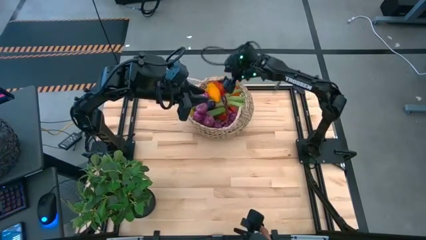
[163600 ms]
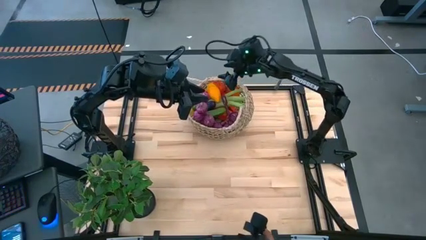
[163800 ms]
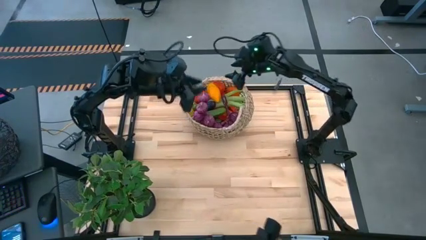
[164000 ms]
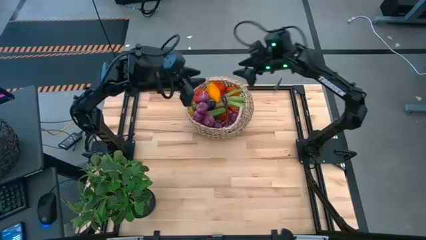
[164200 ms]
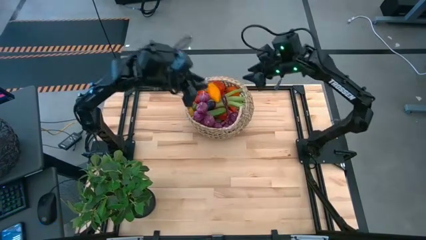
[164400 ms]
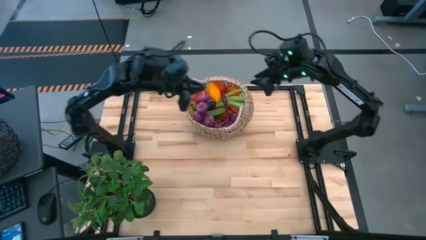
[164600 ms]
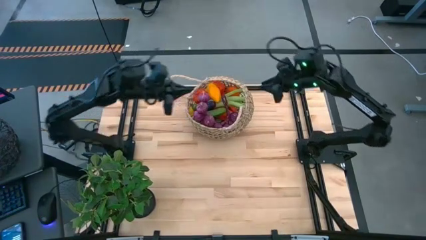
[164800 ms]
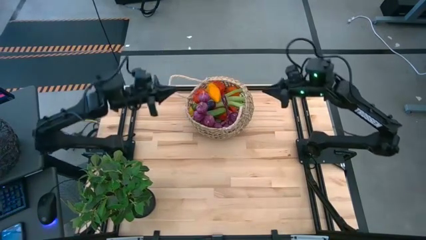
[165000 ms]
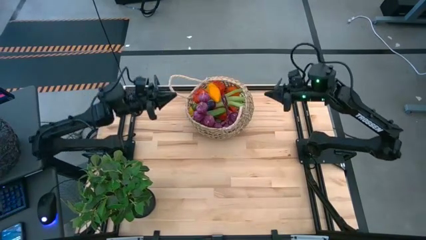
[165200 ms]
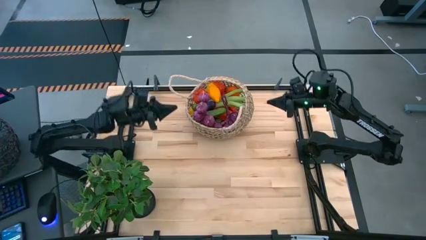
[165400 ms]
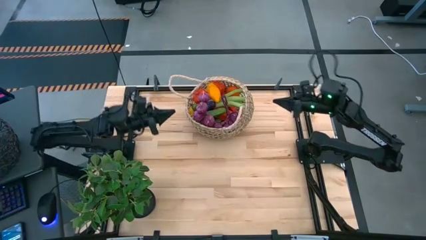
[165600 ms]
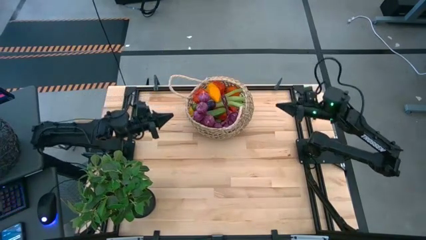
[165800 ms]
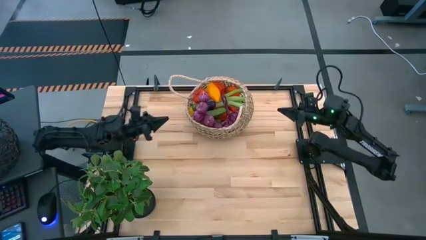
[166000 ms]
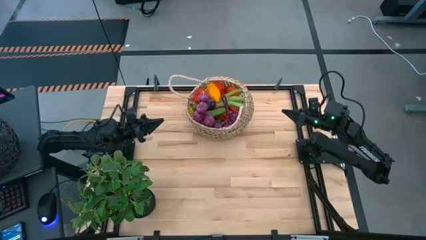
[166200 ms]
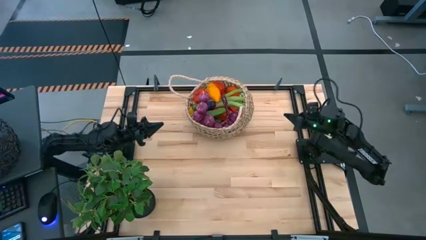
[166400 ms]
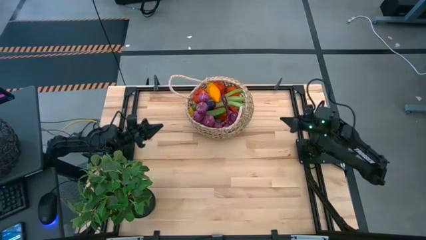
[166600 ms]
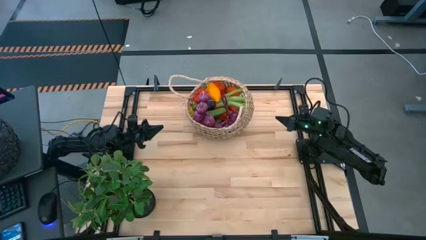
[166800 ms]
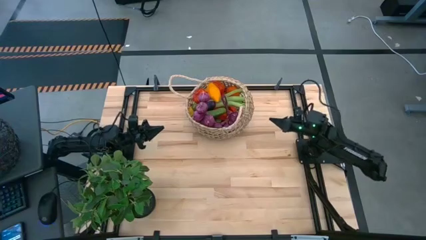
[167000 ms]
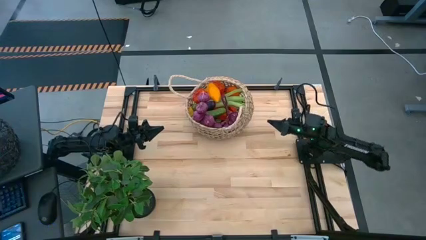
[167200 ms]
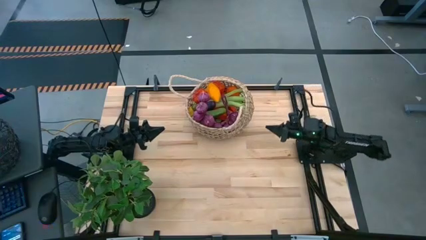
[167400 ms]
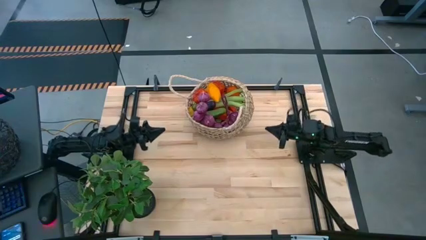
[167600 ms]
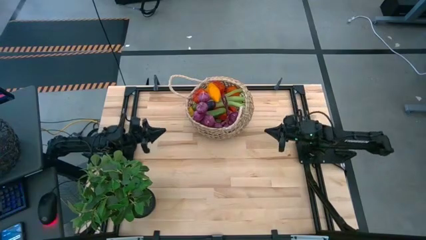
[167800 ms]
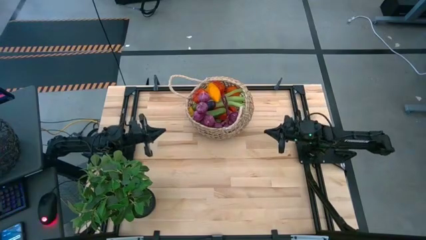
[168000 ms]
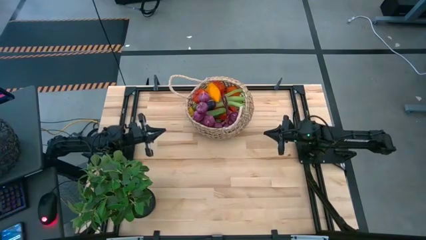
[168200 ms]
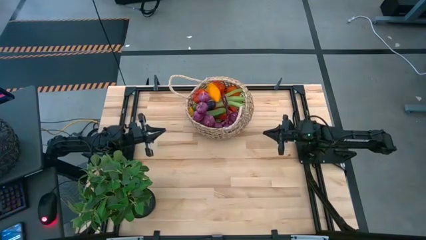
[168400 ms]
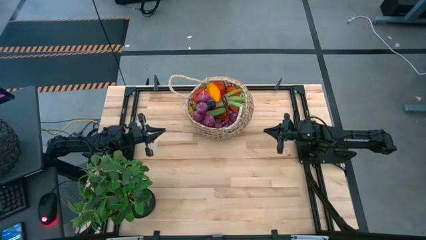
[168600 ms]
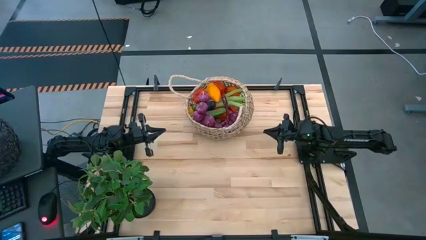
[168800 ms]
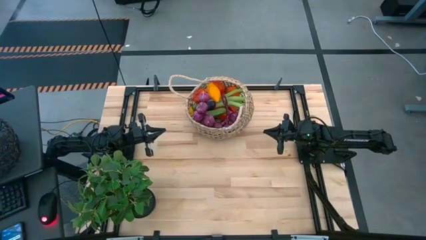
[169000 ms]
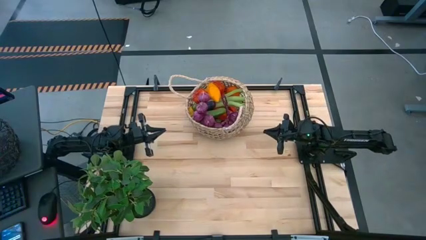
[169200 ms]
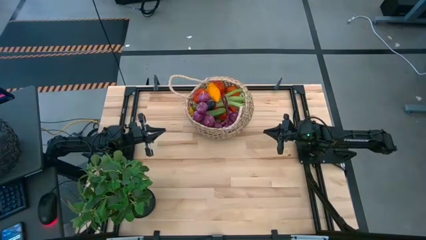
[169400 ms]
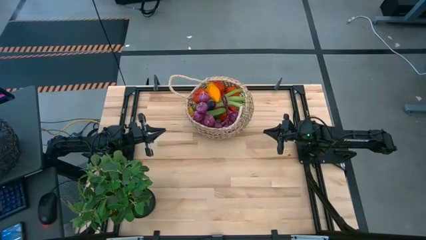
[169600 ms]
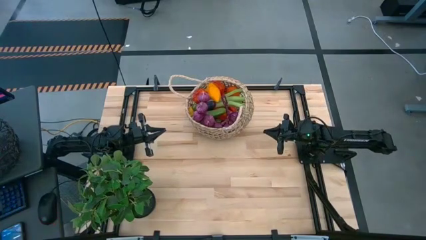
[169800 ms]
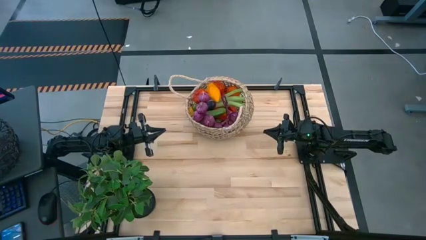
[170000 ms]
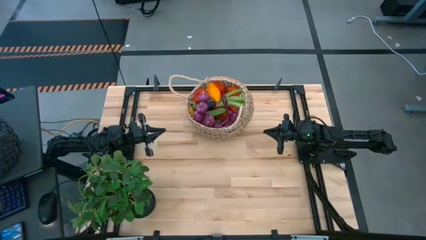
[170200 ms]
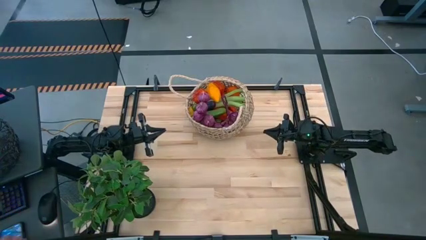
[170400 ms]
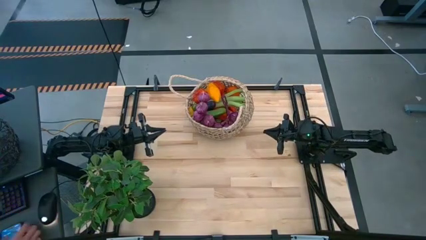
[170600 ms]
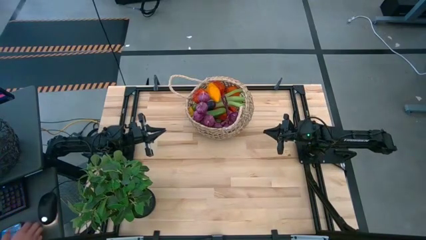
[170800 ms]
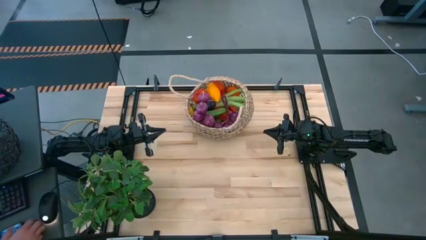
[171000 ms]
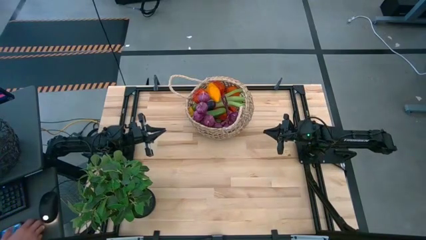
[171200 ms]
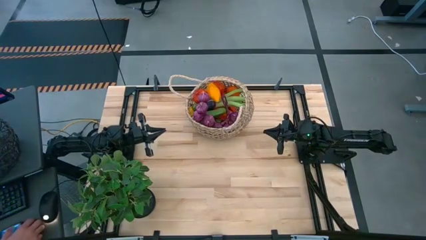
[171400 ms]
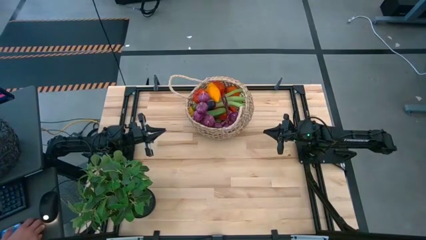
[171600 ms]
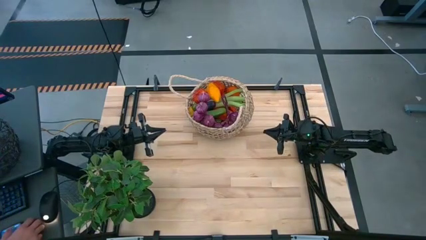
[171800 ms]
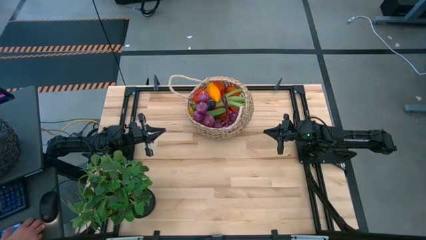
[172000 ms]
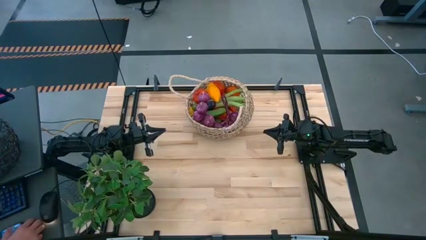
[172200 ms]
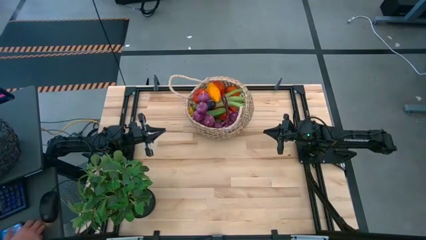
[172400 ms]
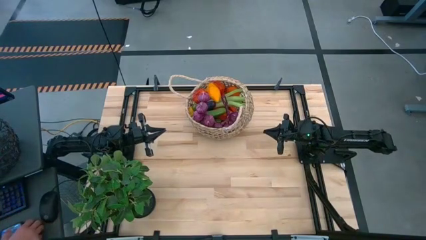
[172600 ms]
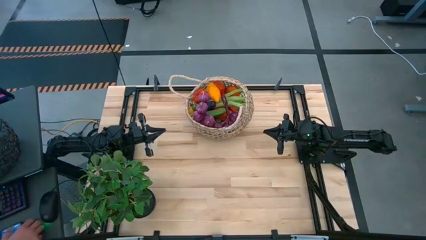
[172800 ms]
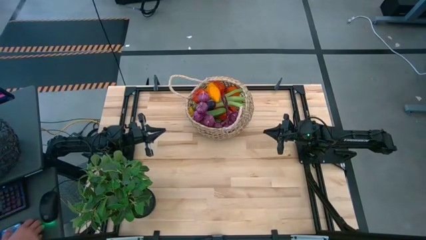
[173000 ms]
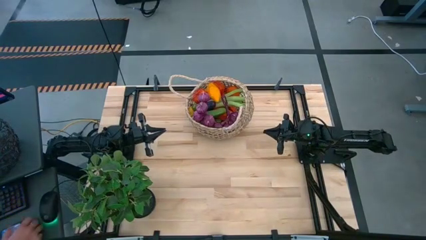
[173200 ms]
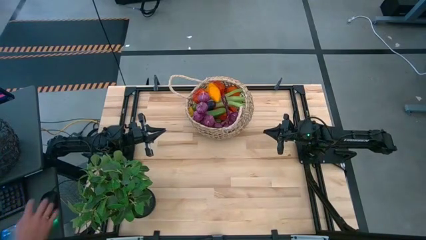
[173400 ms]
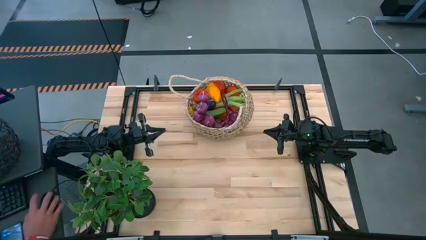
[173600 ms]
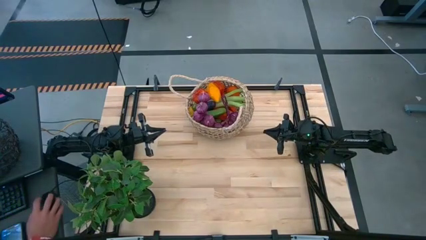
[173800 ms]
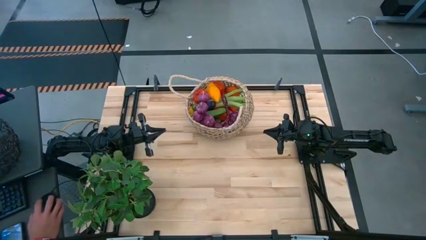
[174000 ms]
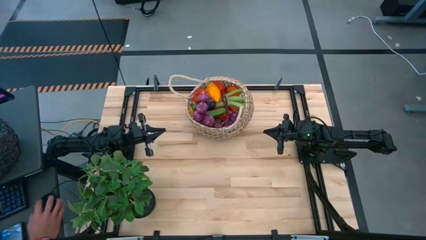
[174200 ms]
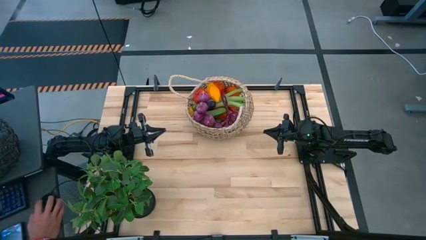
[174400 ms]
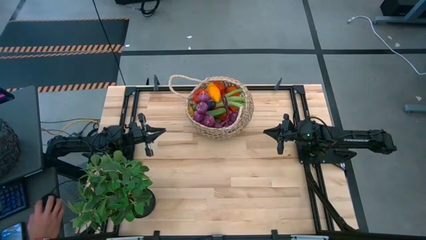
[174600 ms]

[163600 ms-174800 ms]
Task: Build produce basket
Return to Home Position

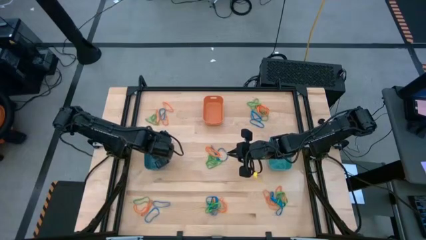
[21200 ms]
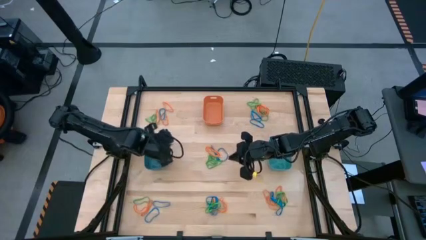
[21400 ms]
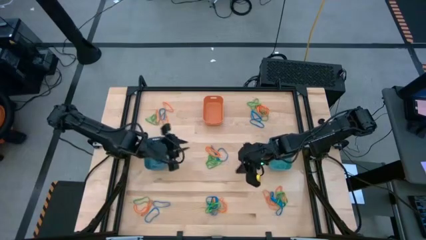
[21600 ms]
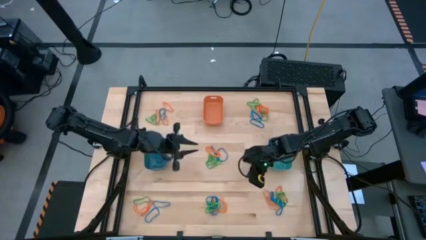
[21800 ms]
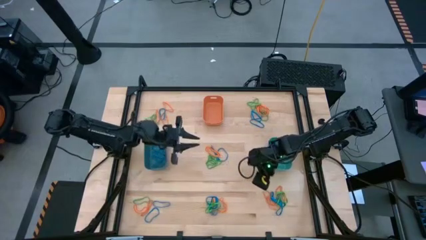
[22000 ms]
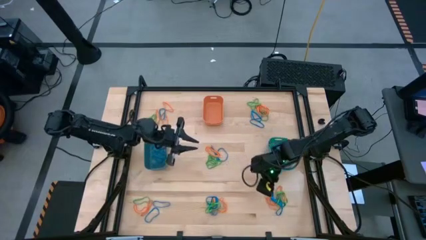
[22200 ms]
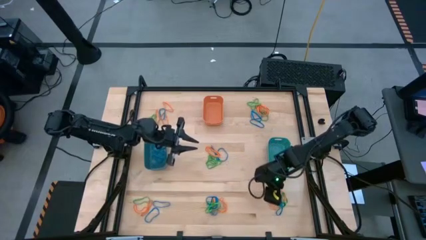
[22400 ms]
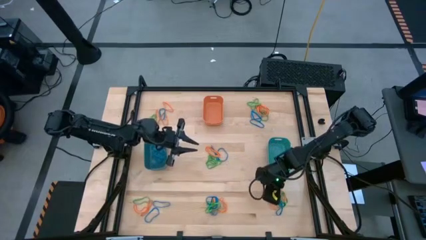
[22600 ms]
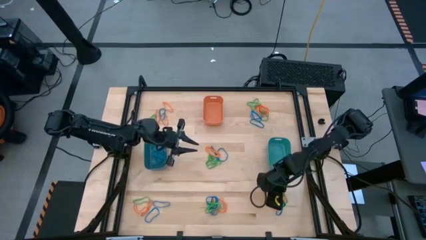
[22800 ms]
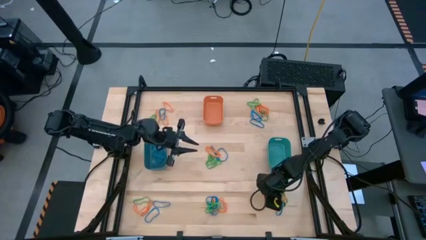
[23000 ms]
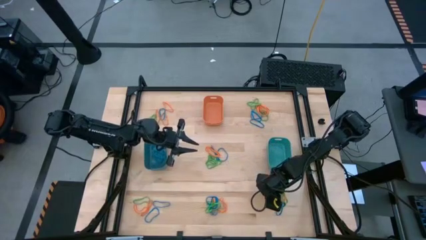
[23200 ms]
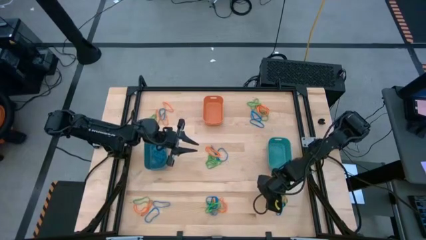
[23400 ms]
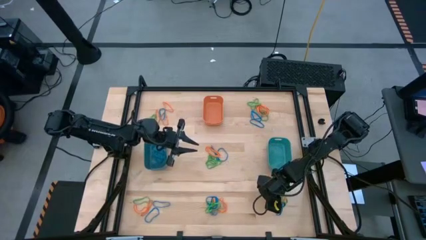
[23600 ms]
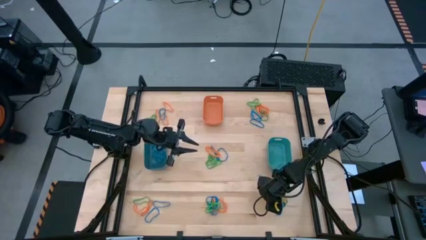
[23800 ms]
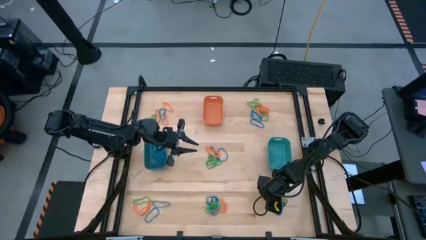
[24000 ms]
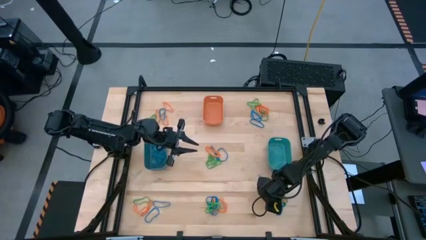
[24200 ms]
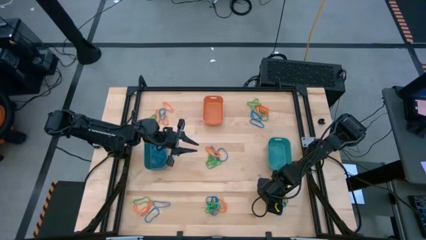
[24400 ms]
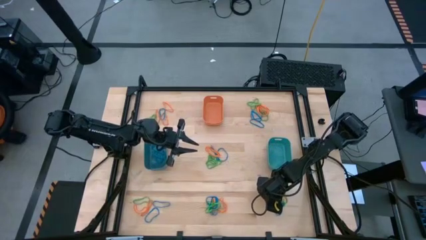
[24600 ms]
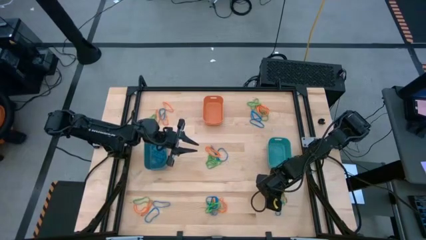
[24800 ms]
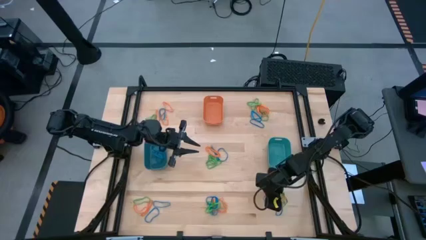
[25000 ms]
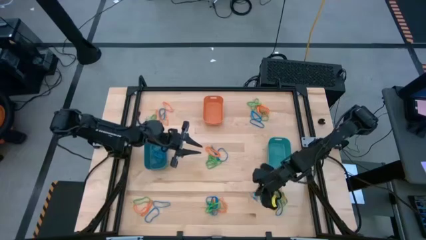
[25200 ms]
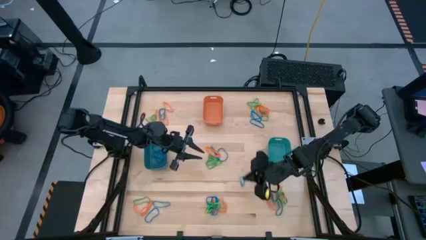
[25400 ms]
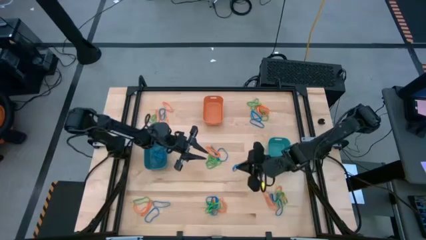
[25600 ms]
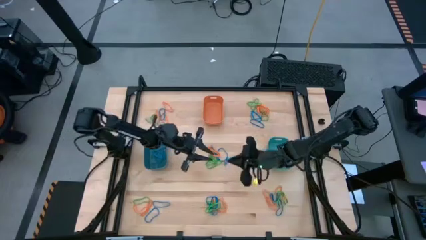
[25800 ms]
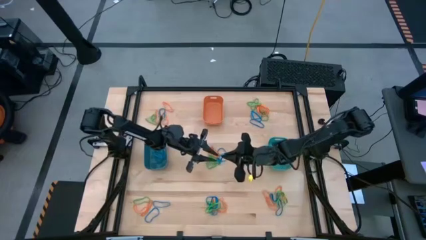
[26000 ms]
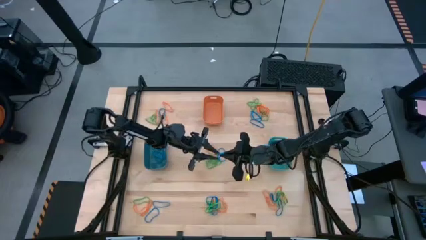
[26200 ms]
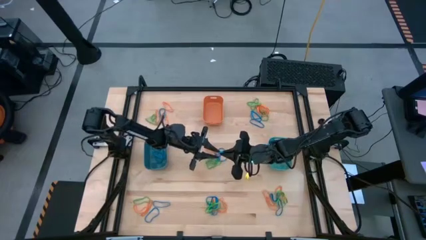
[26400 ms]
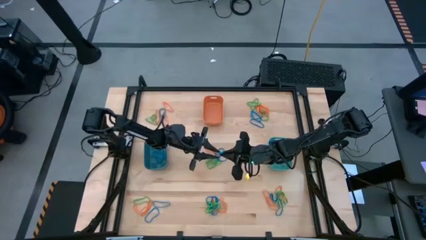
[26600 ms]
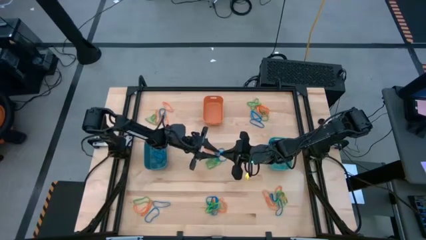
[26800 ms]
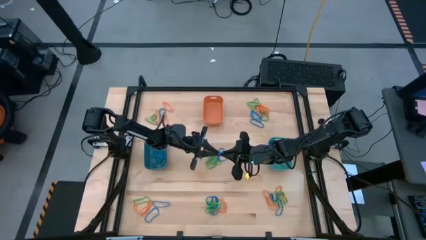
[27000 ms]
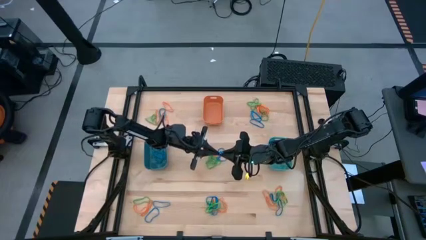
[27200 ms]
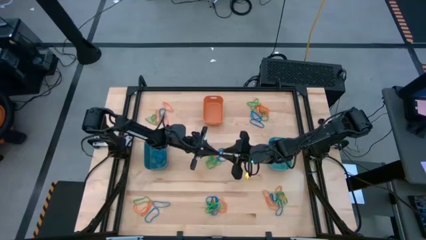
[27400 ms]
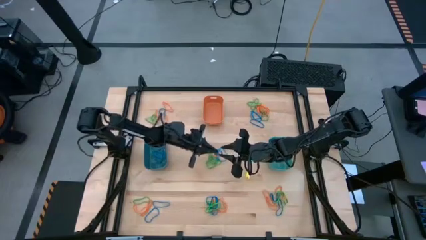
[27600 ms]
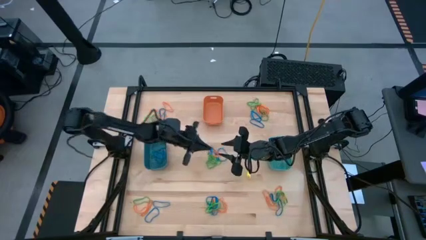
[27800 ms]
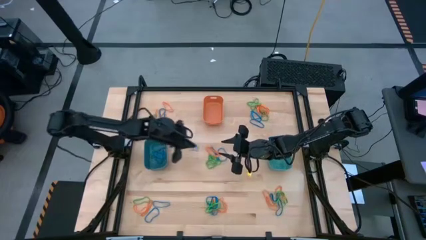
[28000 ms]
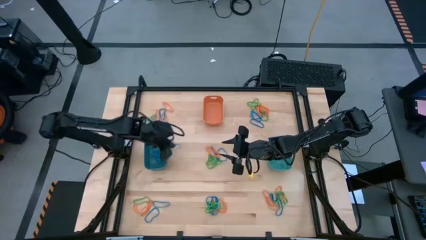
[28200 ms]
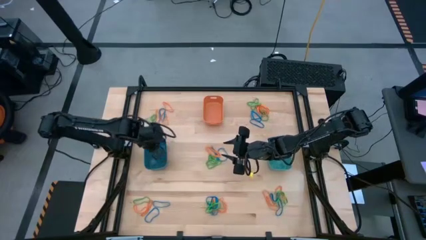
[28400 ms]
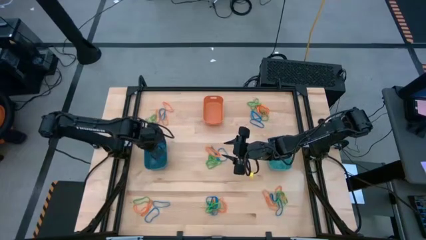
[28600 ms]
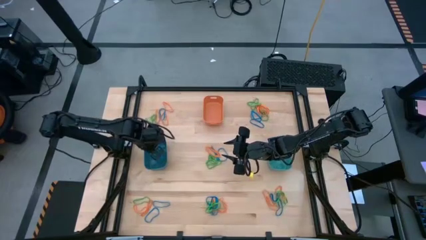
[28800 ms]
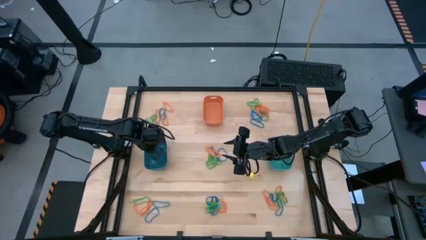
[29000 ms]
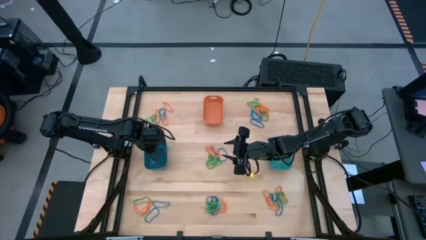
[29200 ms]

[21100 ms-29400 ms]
Task: Sort rubber bands into baskets
Put the blue rubber band into the blue bin
